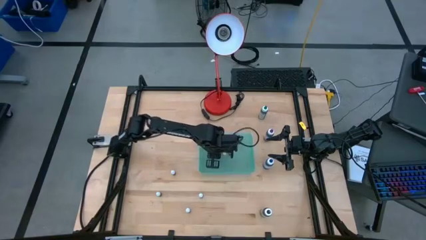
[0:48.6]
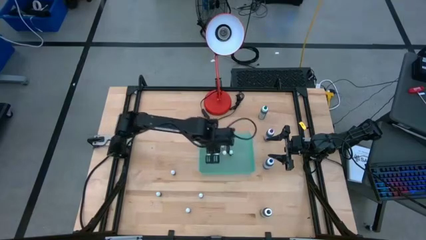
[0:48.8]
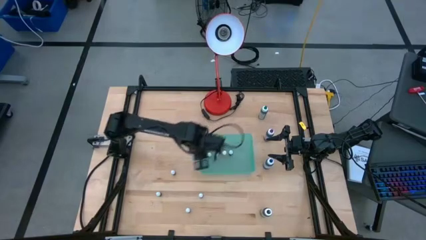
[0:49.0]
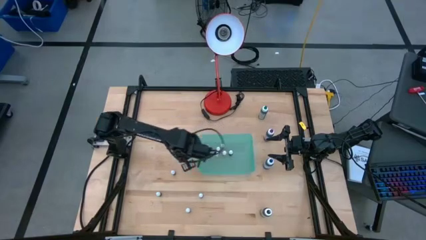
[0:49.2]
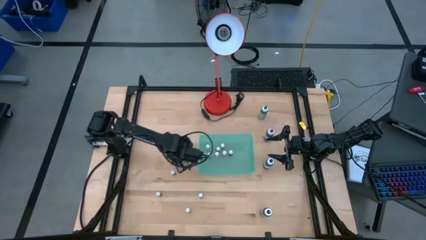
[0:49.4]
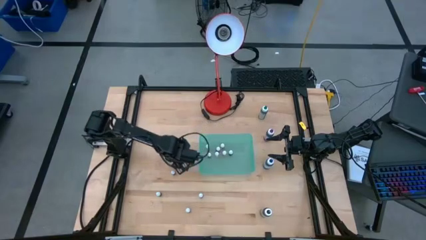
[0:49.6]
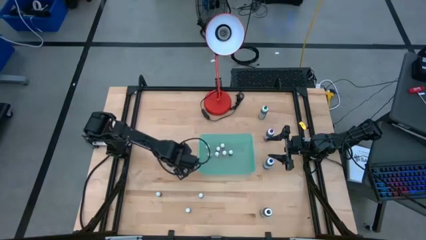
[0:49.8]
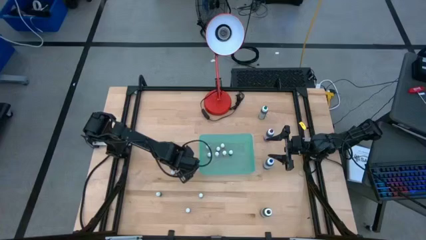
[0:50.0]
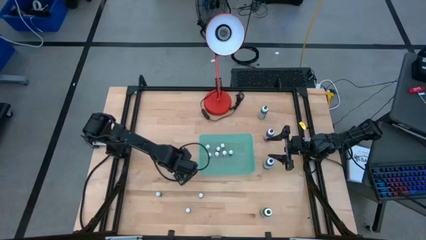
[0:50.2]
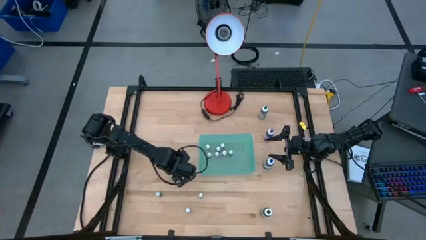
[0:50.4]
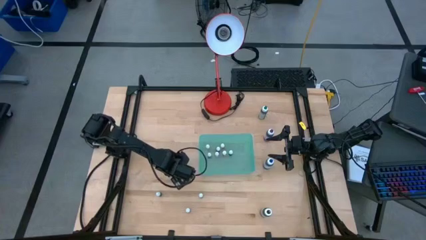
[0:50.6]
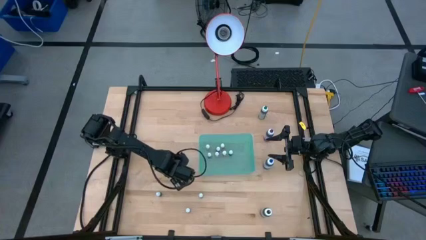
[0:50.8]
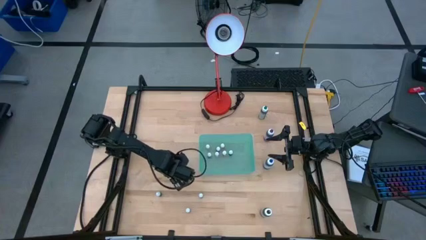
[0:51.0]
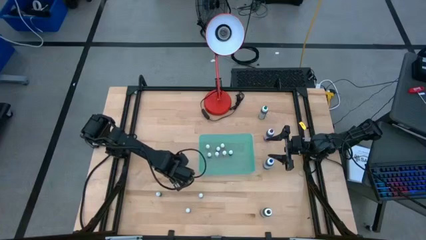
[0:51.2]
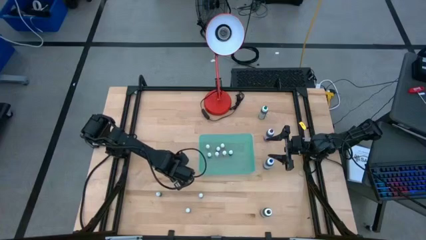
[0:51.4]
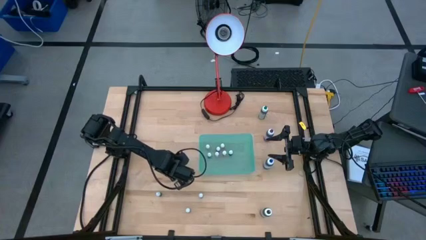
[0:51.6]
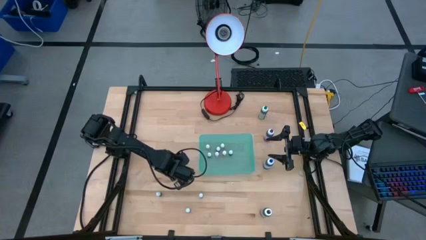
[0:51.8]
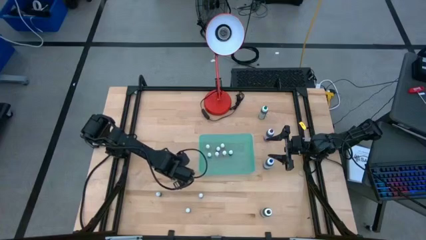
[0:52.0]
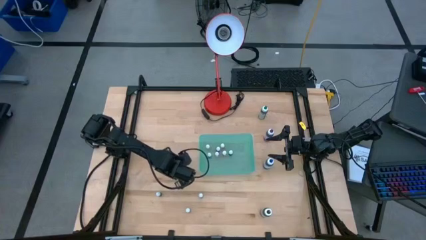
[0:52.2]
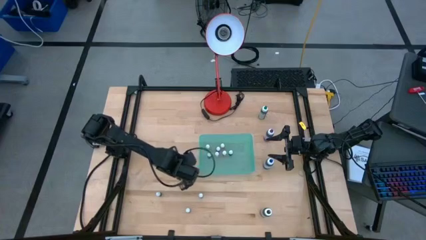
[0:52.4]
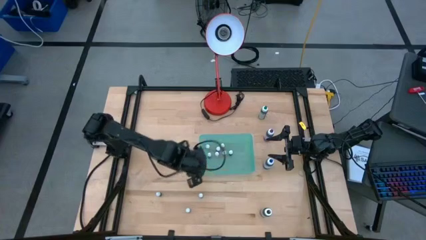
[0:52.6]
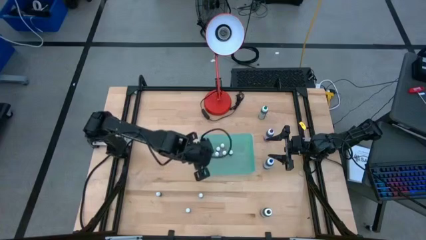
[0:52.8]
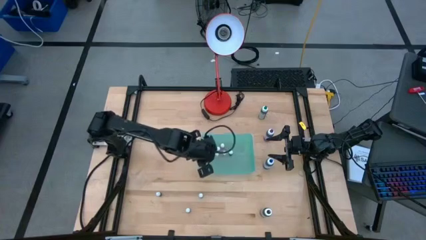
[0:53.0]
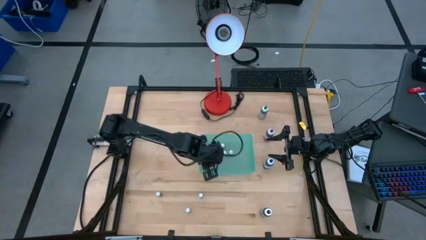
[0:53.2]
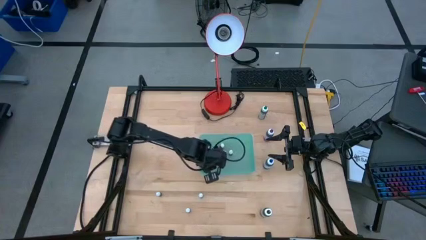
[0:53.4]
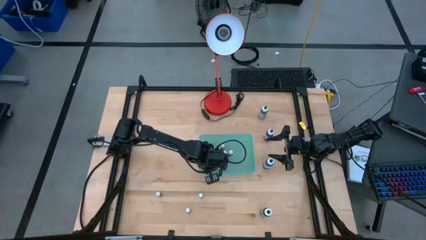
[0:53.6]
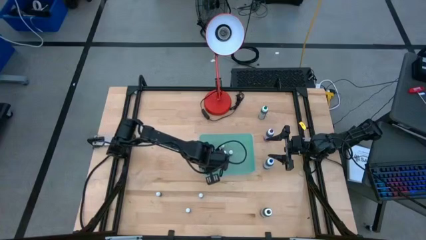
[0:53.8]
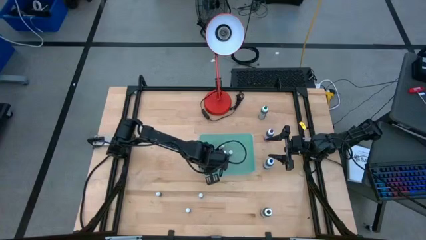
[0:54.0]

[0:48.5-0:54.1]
Task: Pick & Place food coloring
Put the small red food coloring bottle into the green bin

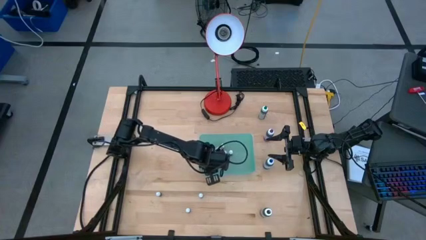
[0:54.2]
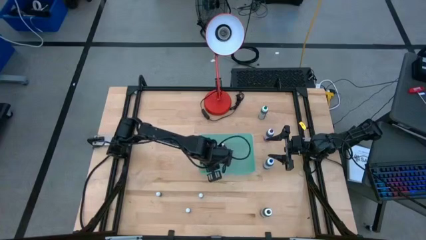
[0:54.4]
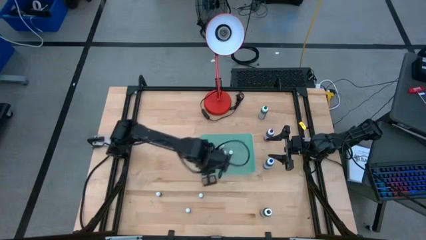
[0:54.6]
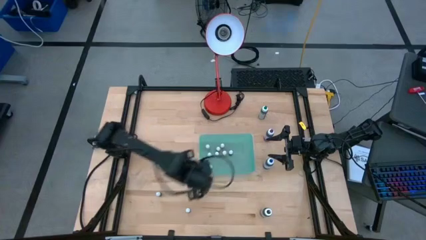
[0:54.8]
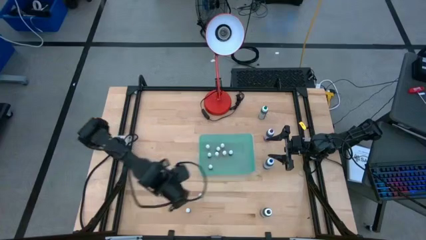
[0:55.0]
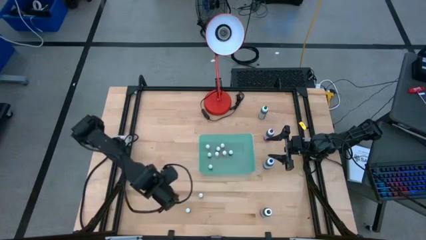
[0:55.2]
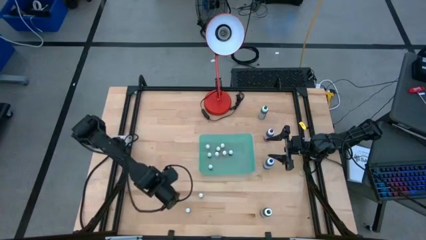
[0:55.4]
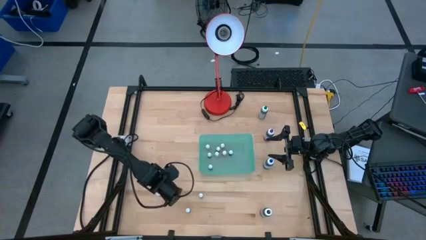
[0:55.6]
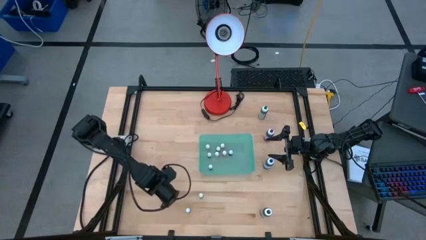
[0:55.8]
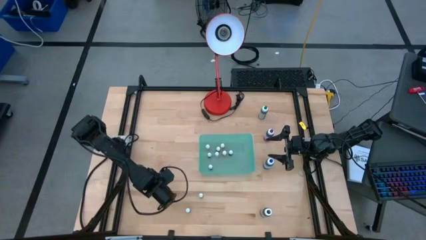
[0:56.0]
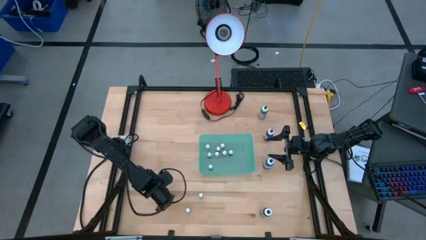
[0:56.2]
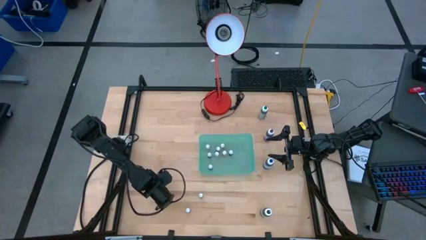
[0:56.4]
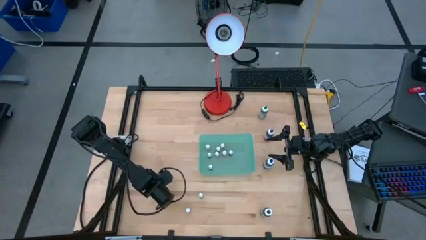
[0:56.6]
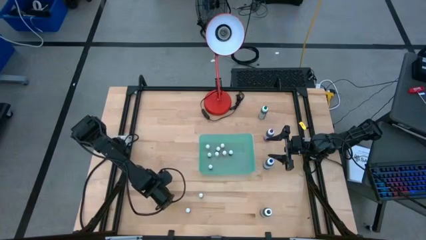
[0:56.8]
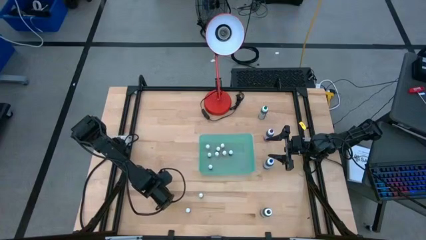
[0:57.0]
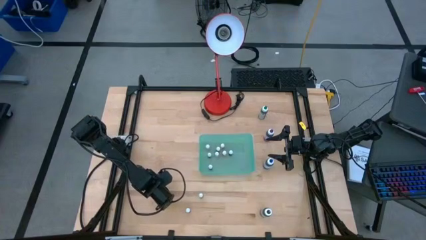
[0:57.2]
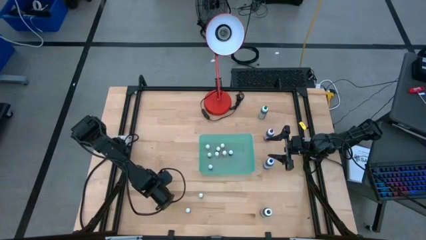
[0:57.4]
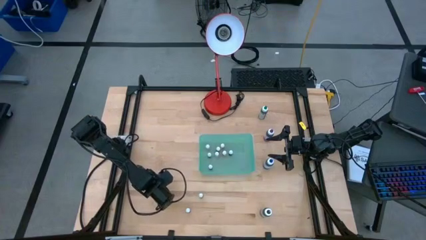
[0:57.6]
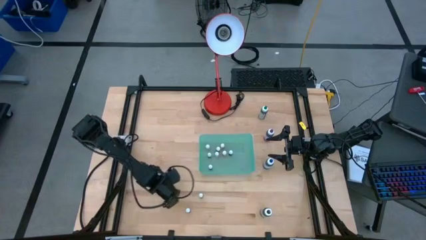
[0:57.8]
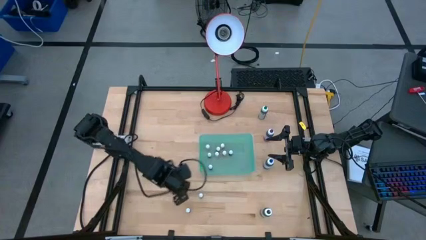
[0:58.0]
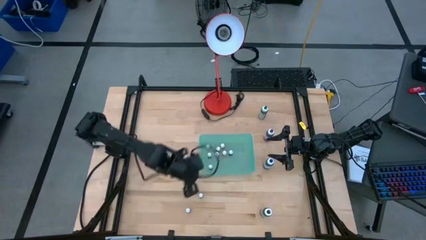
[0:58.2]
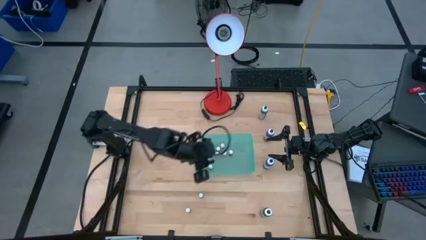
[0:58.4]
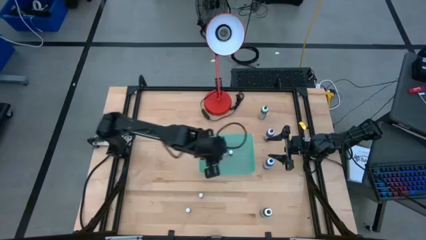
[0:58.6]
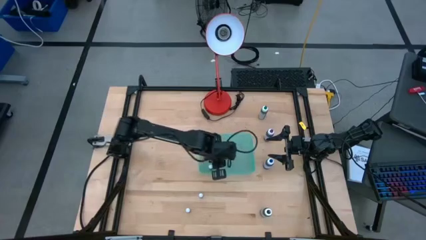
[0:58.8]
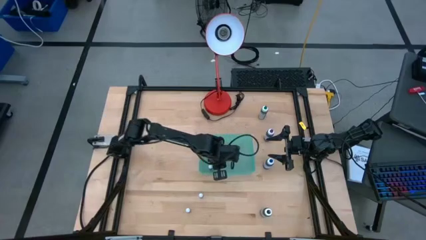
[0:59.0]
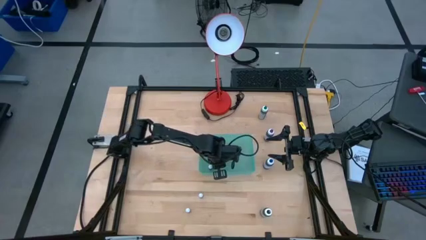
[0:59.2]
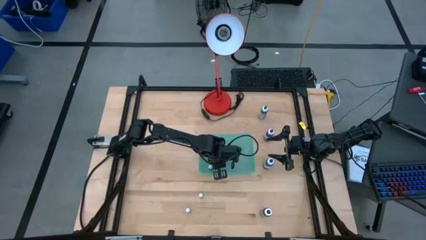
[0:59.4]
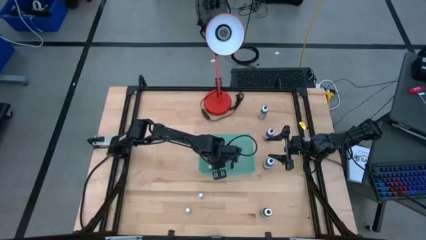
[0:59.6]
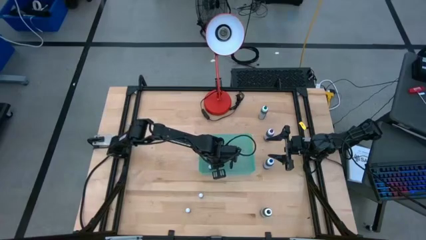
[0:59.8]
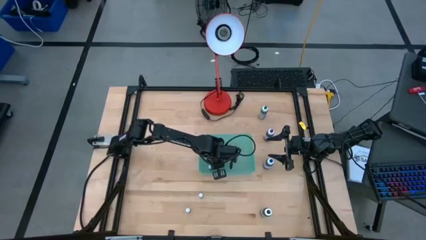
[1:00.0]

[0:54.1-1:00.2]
Put the small green food coloring bottle into the green bin

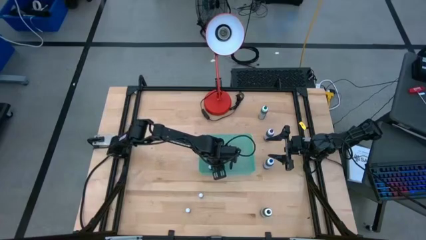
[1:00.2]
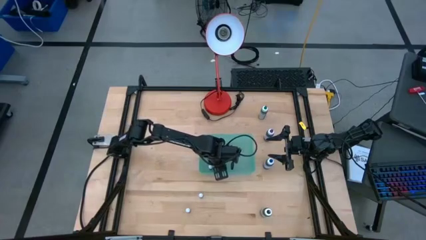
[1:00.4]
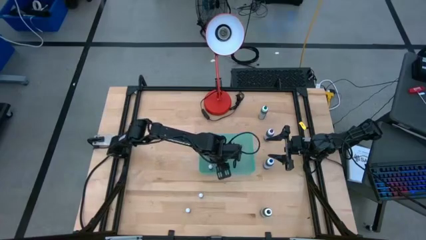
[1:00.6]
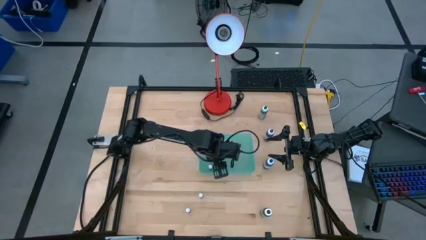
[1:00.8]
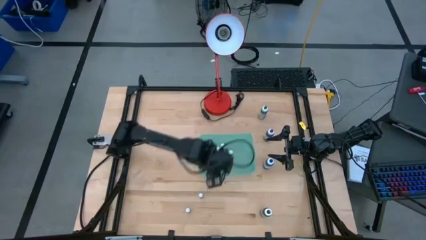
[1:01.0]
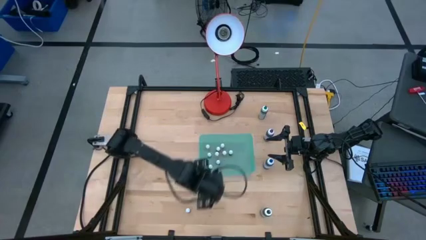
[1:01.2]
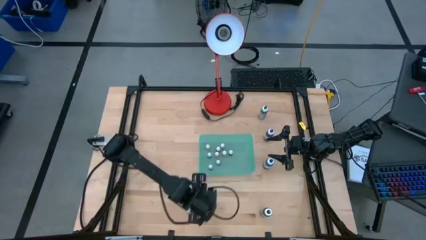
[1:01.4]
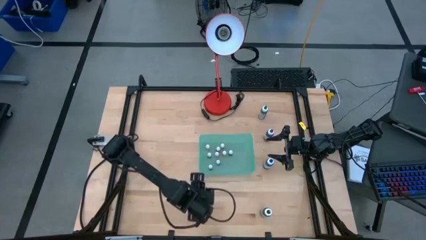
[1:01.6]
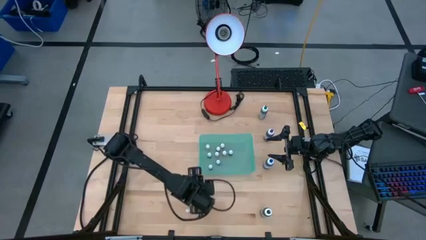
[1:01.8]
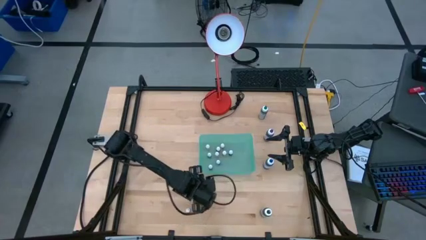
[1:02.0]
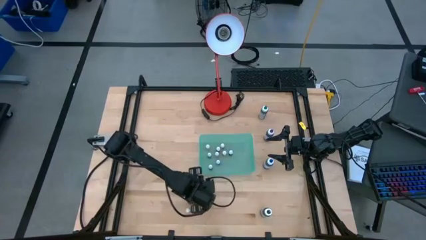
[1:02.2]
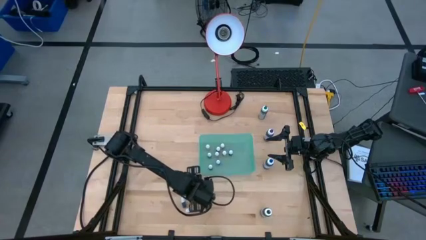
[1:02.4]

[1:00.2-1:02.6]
Put the small blue food coloring bottle into the green bin

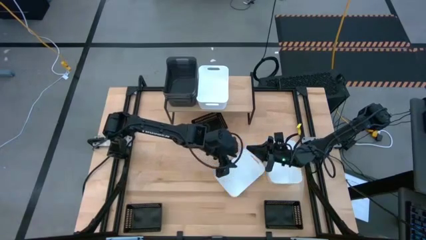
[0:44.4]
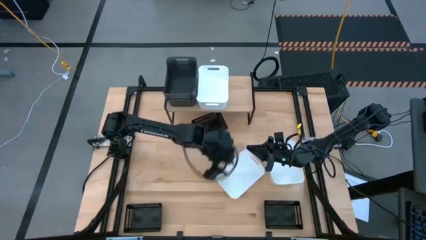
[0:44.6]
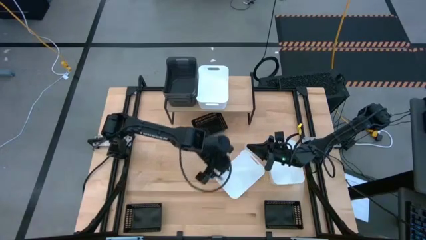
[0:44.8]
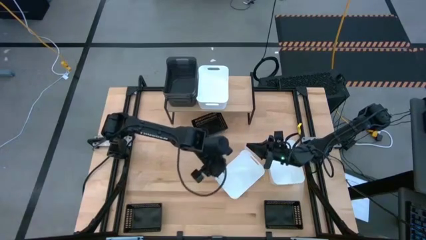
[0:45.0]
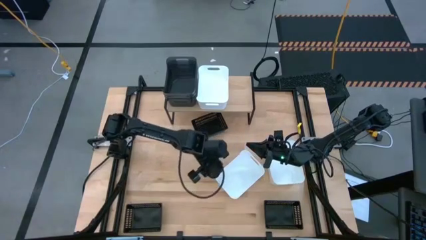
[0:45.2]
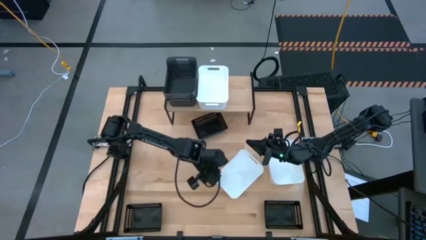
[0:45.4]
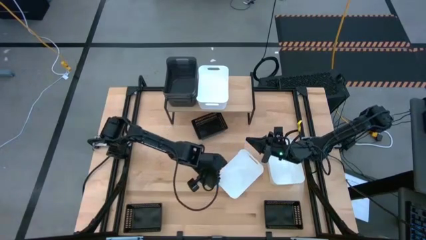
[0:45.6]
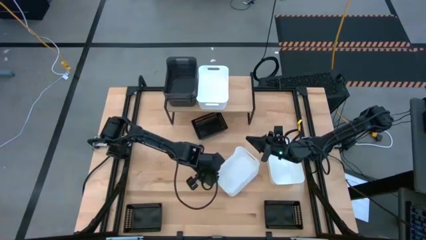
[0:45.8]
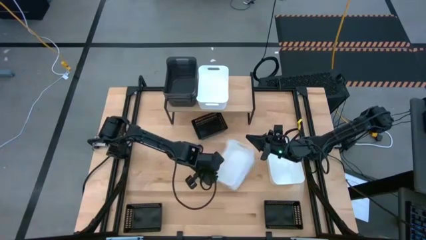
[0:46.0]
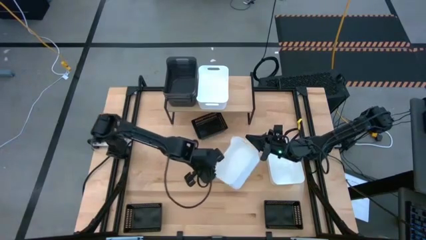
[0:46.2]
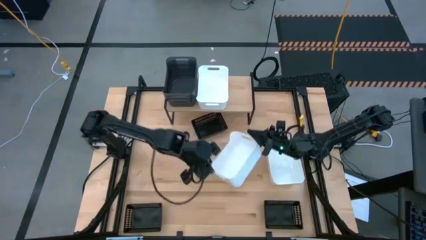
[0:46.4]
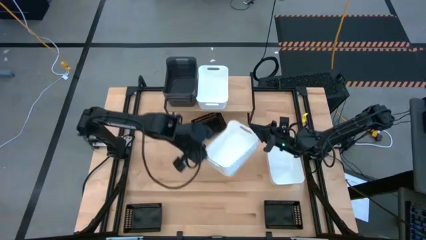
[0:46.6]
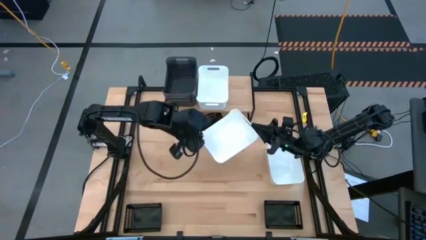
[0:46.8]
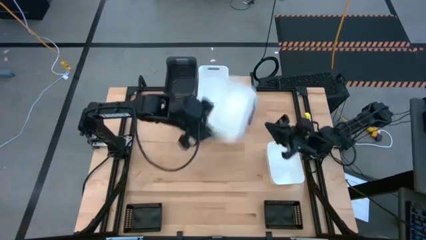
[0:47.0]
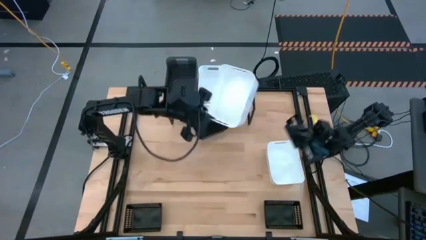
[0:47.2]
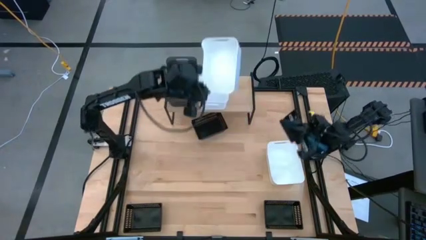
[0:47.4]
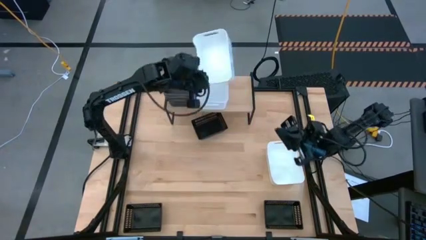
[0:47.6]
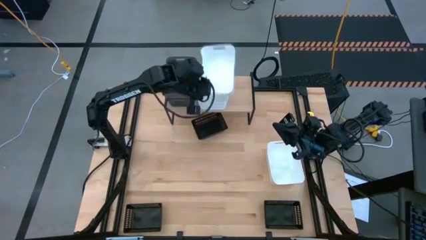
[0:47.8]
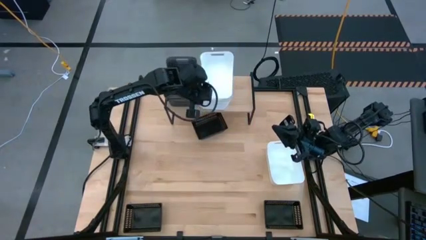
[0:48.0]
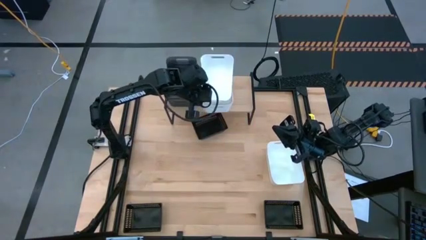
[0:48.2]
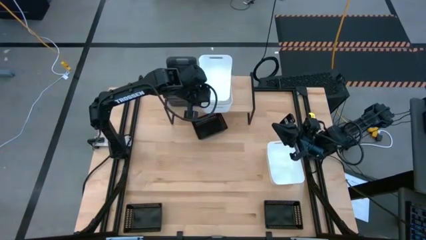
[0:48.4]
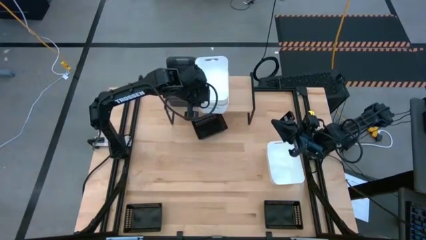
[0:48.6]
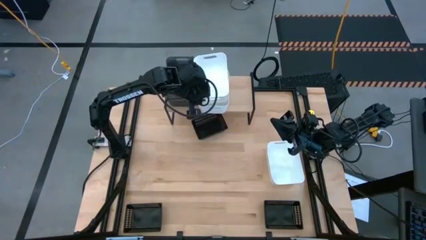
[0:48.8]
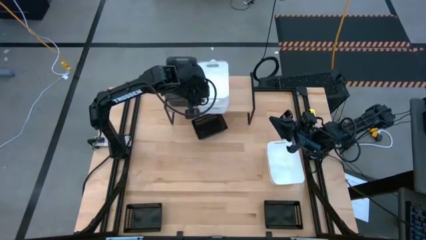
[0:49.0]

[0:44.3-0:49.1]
Task: Stack baskets on shelf by color
Stack the left white bin on top of the white bin on the shelf
